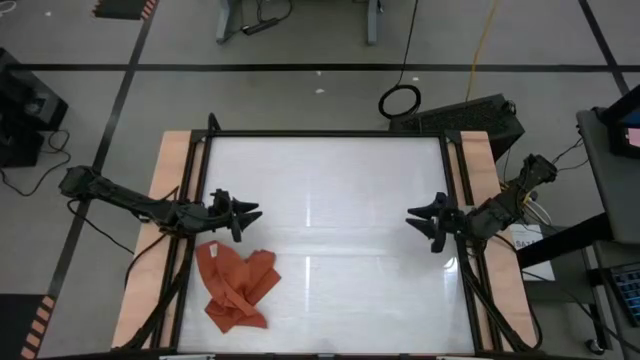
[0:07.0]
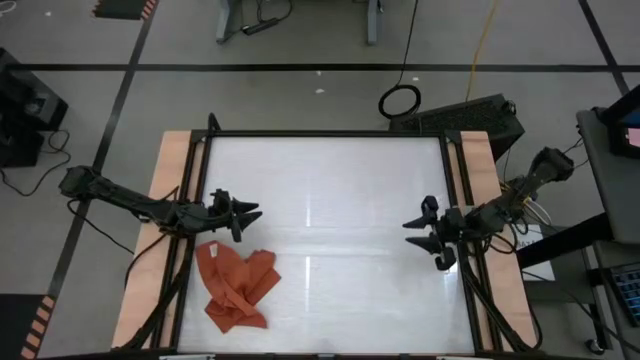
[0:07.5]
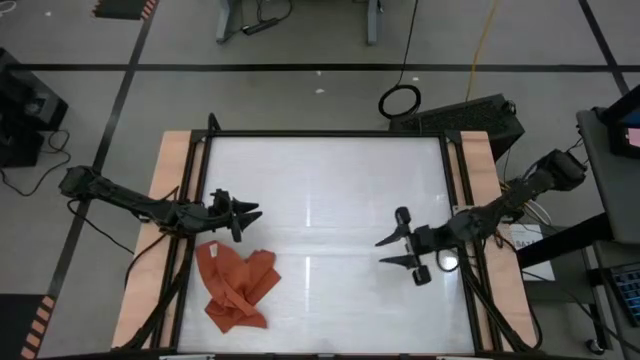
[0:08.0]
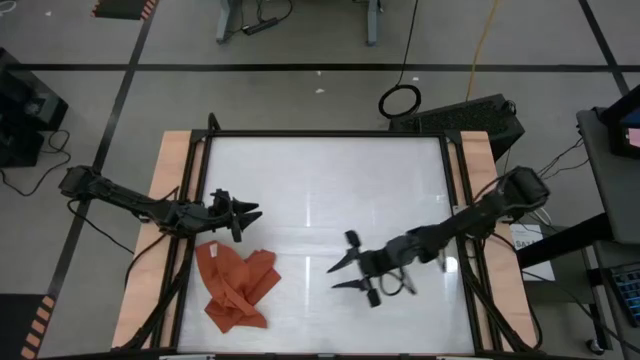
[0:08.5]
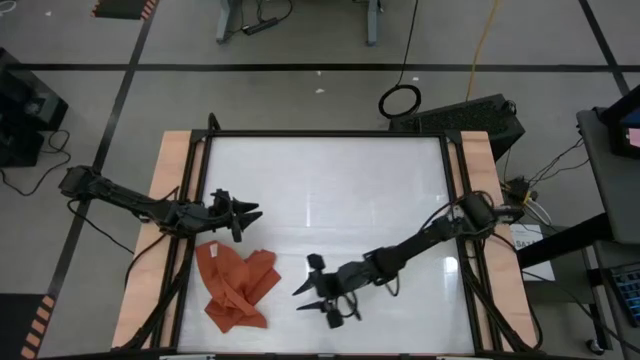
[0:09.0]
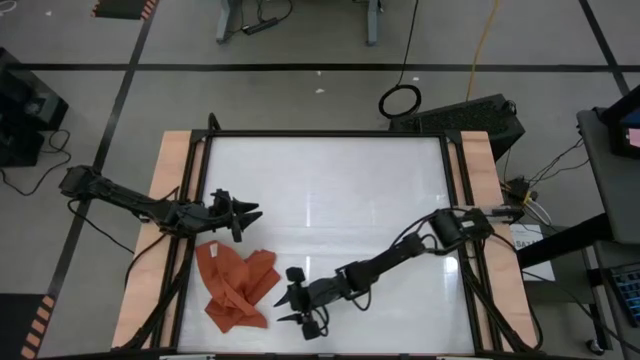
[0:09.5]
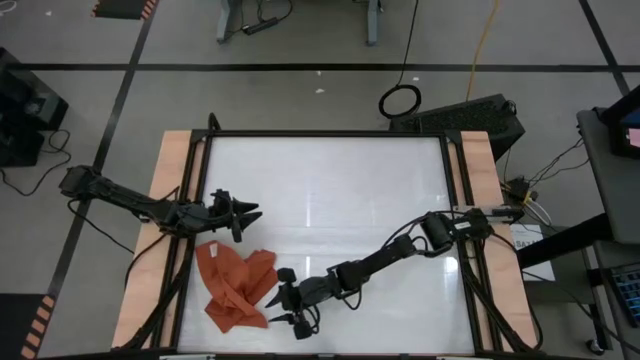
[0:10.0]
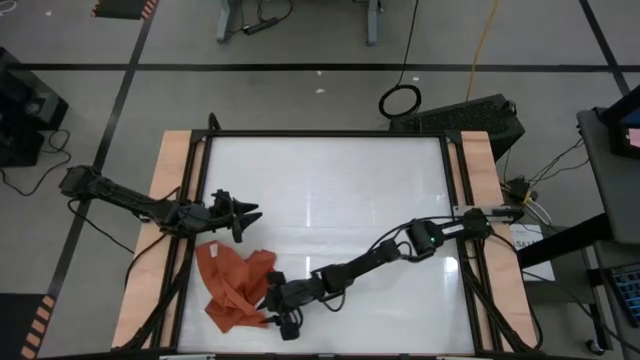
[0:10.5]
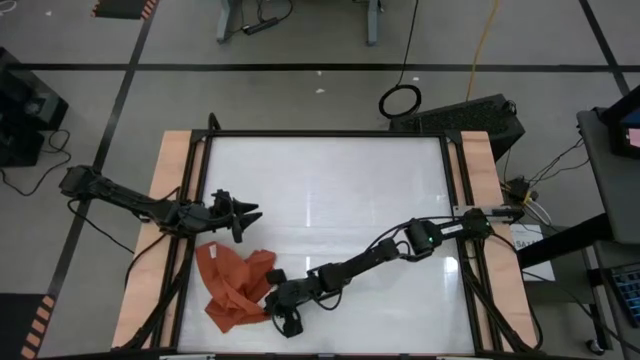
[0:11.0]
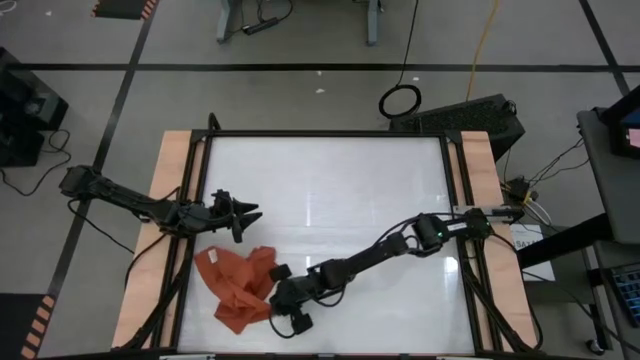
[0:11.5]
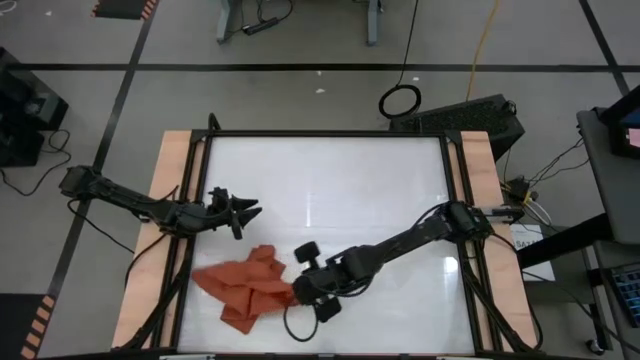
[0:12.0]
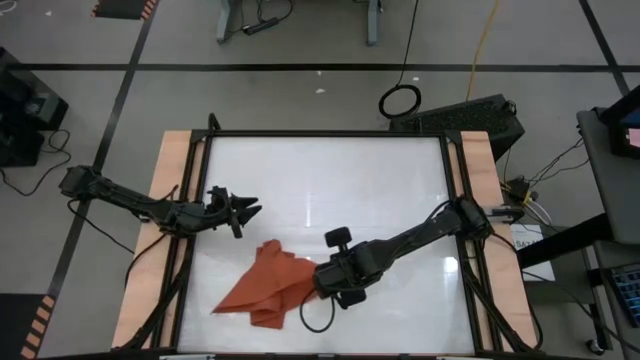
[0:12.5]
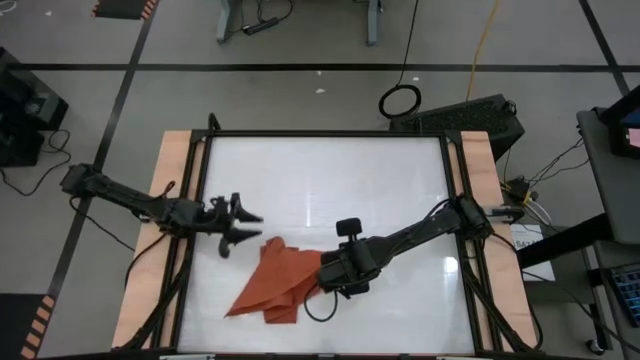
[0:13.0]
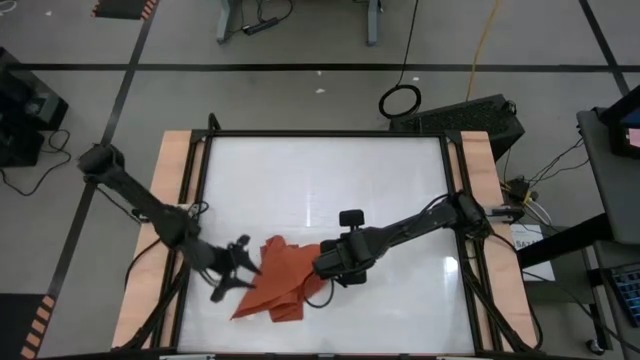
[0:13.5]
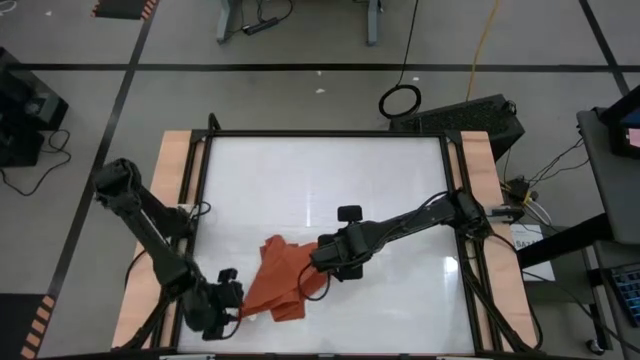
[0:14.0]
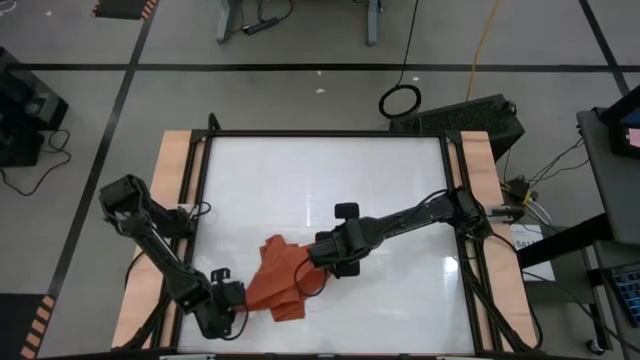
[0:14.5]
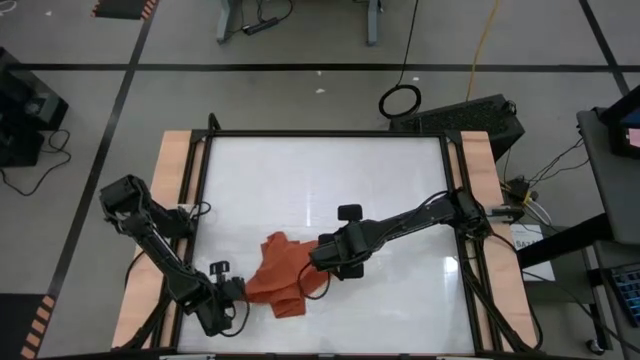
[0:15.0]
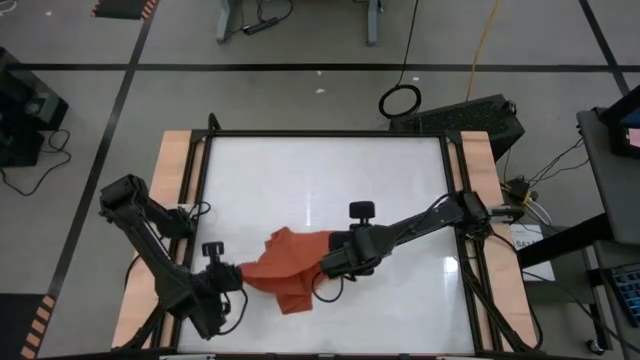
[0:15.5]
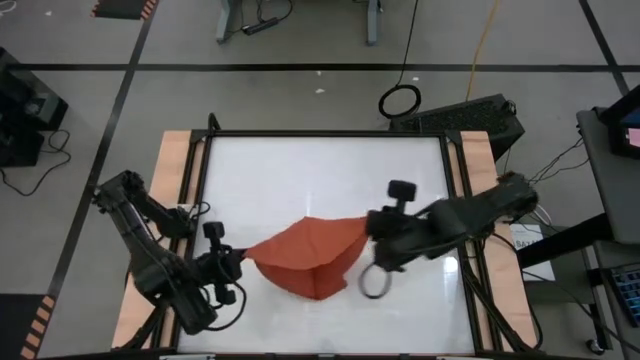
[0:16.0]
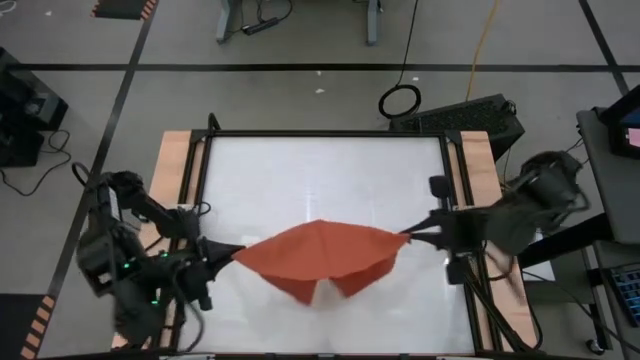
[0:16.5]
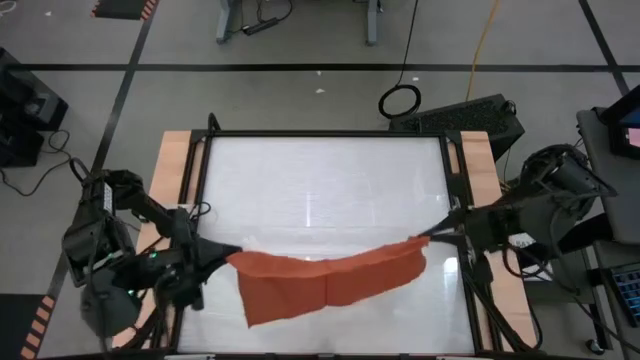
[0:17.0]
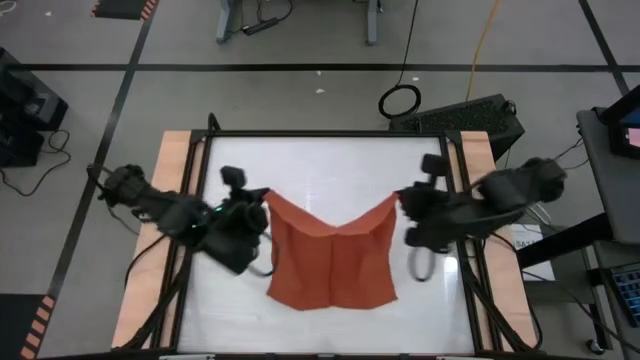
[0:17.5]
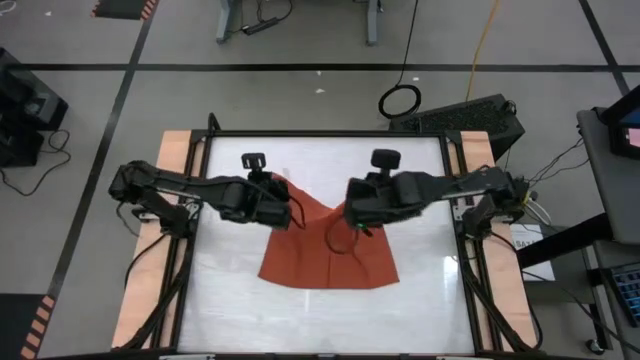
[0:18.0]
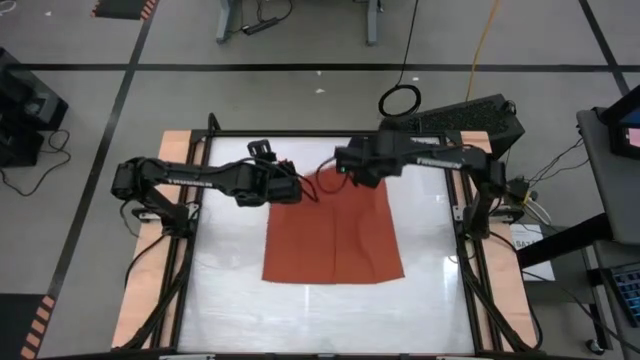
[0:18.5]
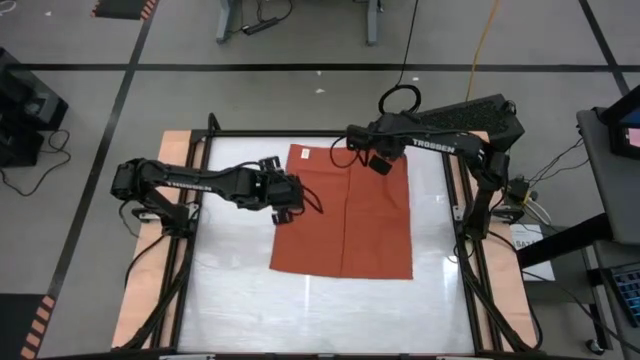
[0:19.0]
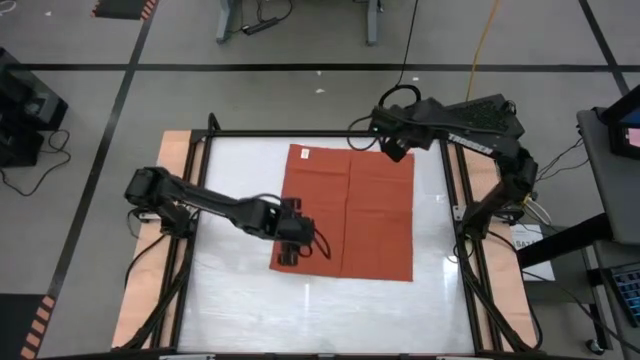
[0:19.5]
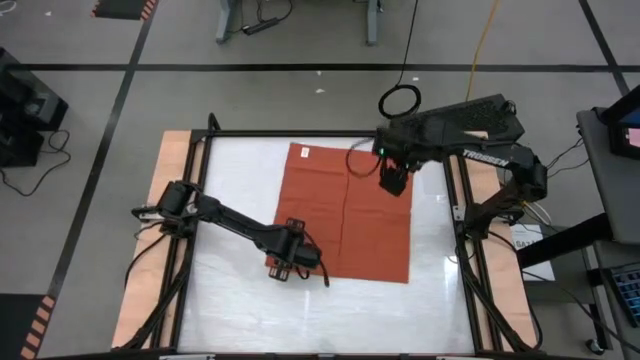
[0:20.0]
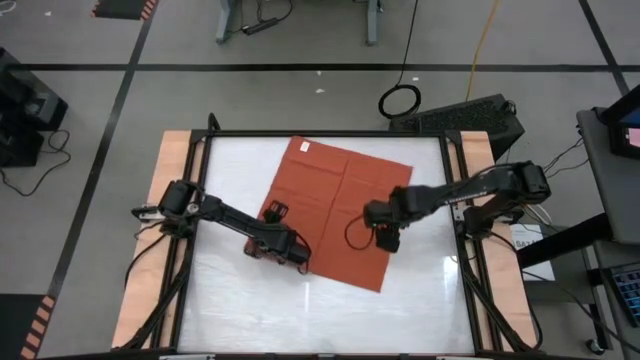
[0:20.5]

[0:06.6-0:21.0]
Task: Roll towel into tight, uniform cylinder
Fold the kitchen towel
